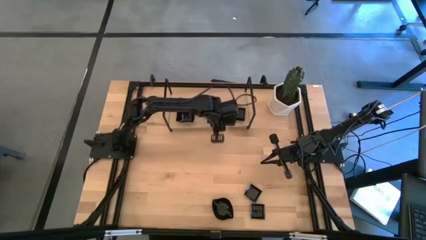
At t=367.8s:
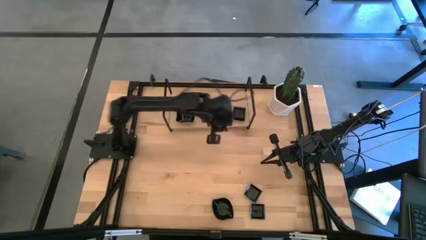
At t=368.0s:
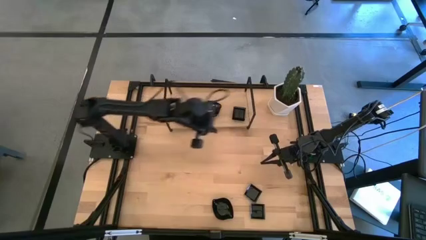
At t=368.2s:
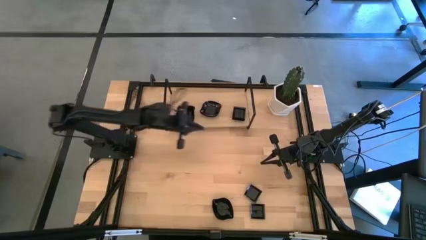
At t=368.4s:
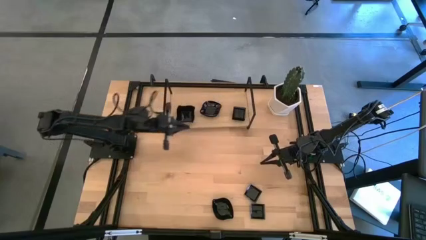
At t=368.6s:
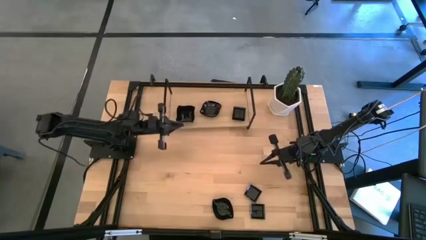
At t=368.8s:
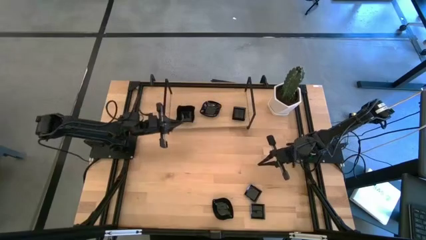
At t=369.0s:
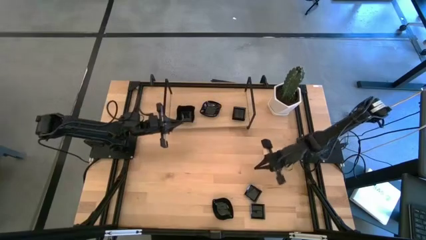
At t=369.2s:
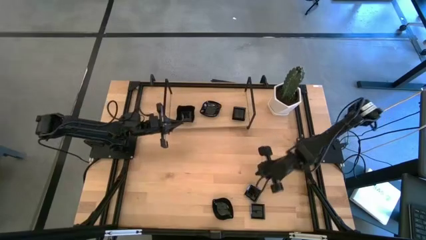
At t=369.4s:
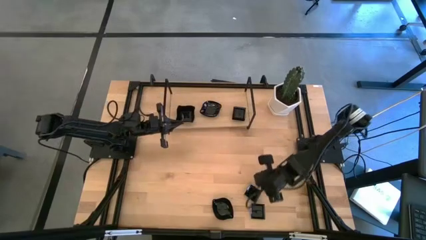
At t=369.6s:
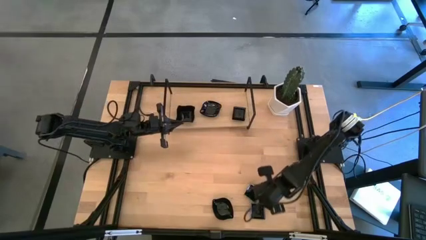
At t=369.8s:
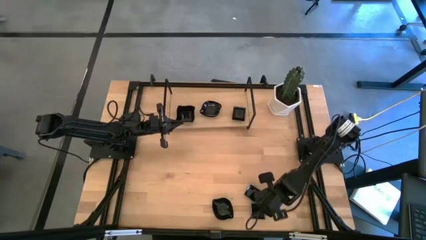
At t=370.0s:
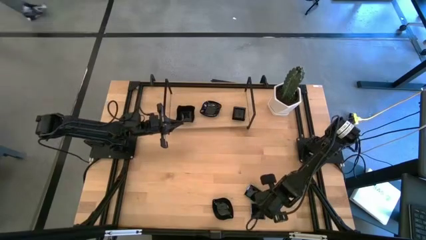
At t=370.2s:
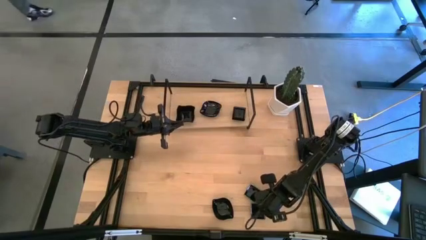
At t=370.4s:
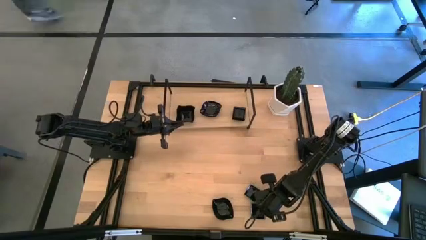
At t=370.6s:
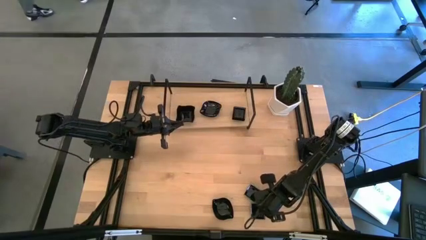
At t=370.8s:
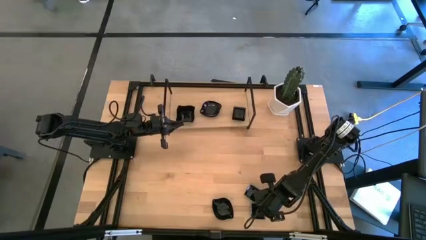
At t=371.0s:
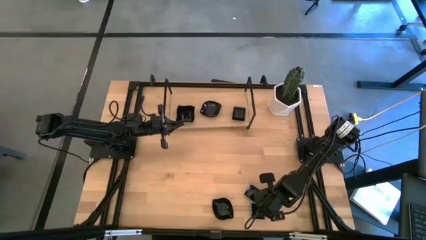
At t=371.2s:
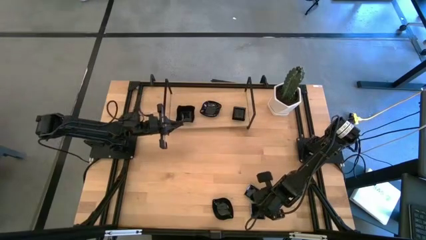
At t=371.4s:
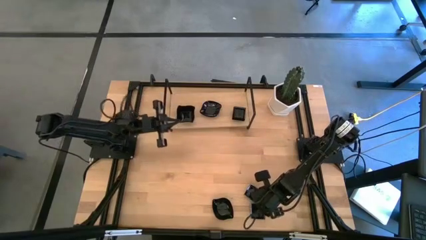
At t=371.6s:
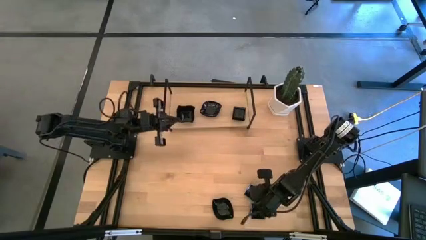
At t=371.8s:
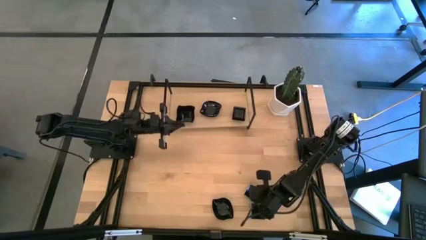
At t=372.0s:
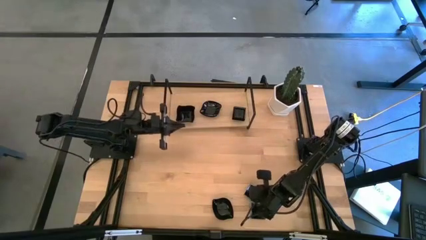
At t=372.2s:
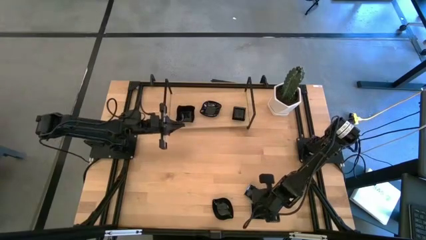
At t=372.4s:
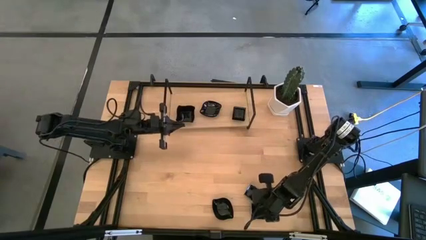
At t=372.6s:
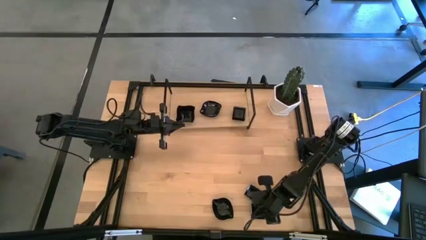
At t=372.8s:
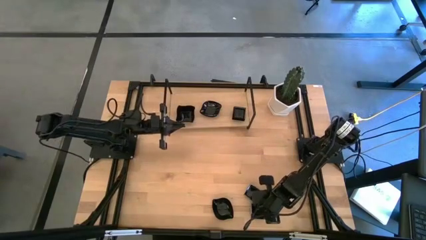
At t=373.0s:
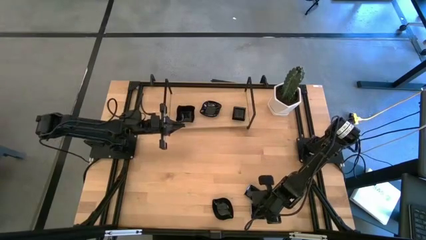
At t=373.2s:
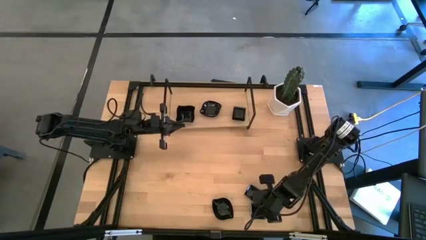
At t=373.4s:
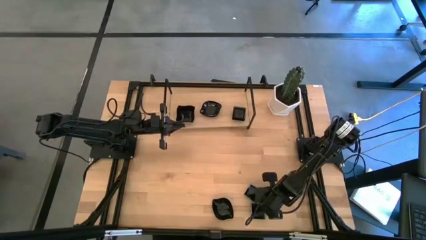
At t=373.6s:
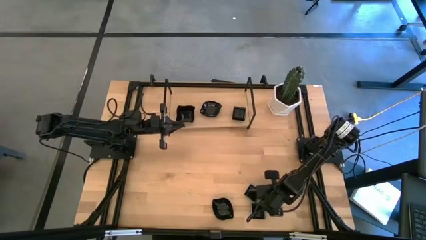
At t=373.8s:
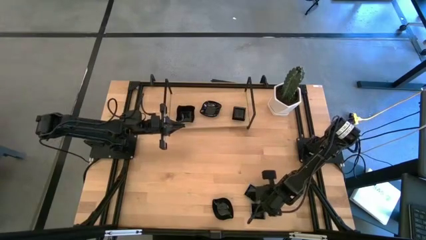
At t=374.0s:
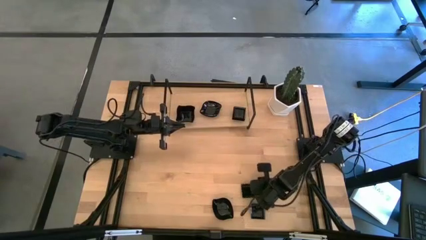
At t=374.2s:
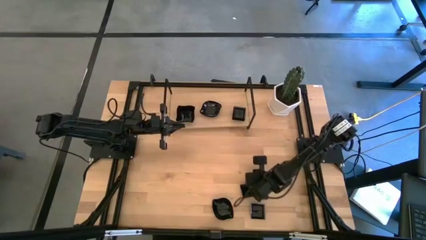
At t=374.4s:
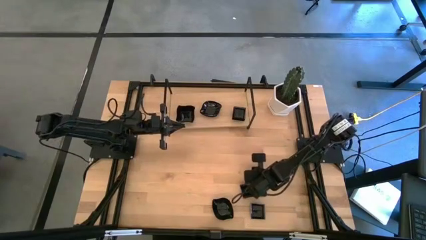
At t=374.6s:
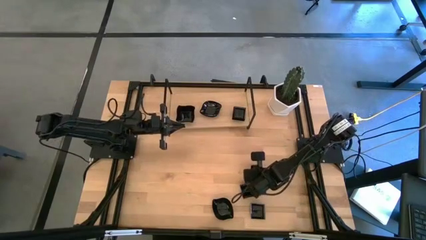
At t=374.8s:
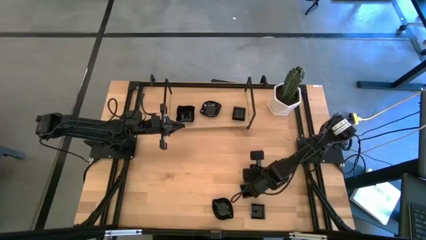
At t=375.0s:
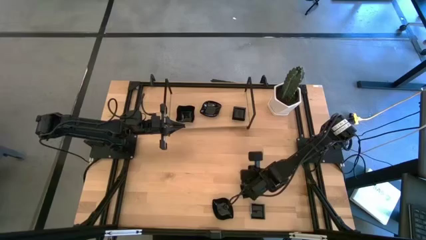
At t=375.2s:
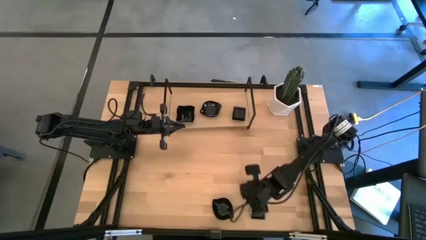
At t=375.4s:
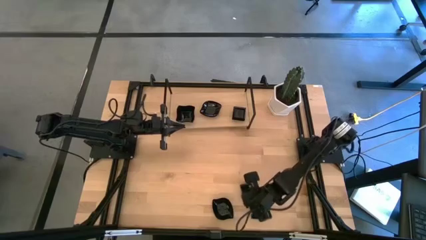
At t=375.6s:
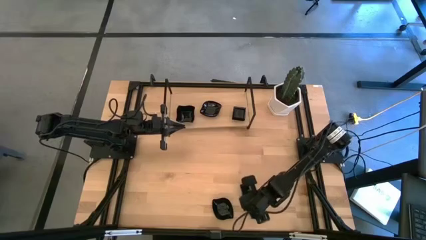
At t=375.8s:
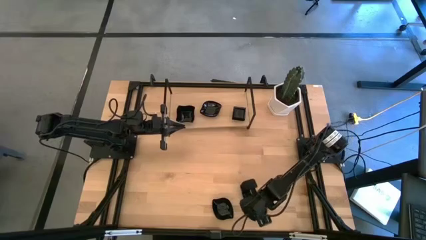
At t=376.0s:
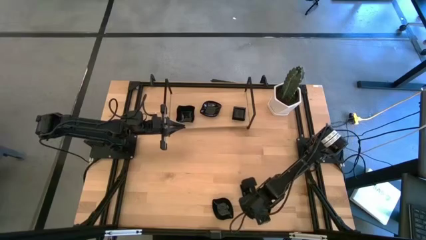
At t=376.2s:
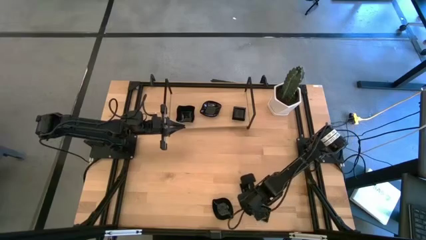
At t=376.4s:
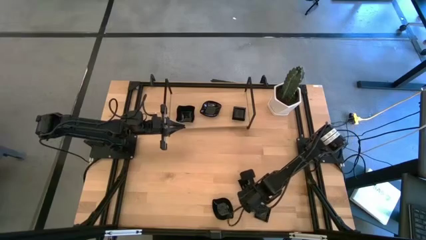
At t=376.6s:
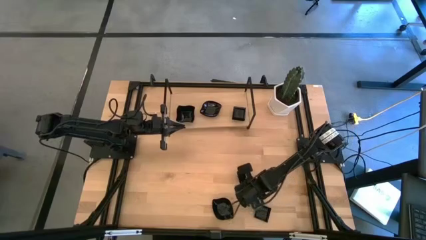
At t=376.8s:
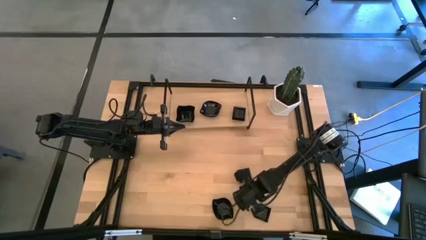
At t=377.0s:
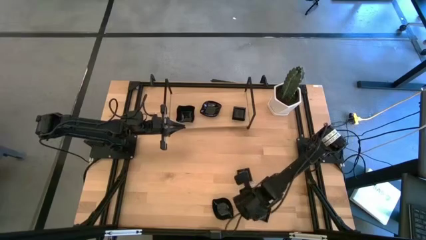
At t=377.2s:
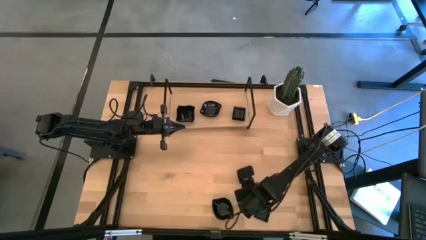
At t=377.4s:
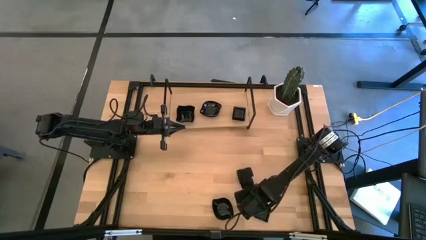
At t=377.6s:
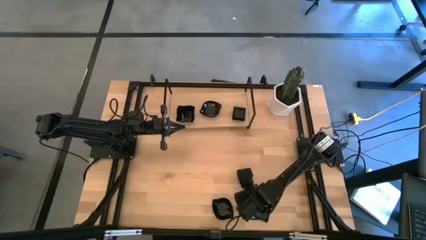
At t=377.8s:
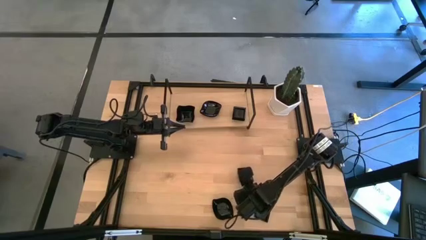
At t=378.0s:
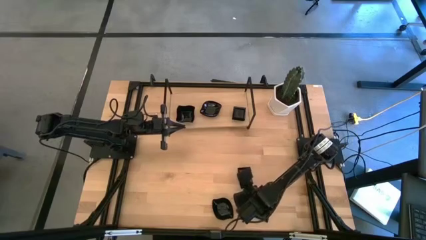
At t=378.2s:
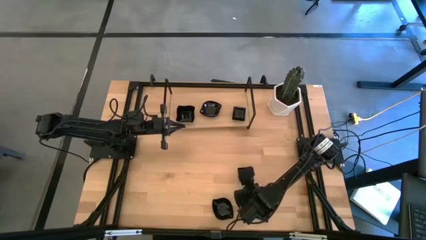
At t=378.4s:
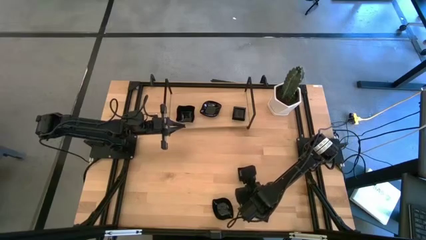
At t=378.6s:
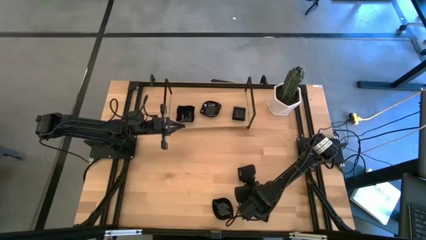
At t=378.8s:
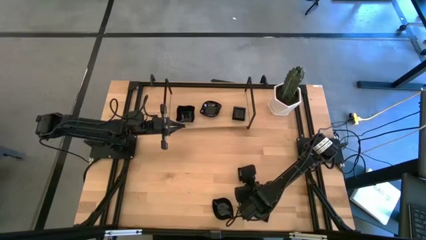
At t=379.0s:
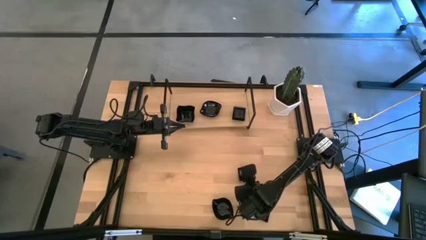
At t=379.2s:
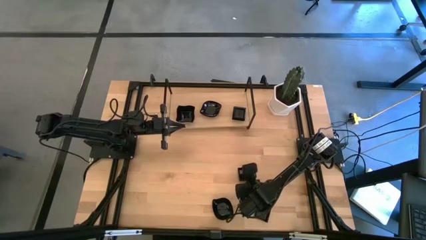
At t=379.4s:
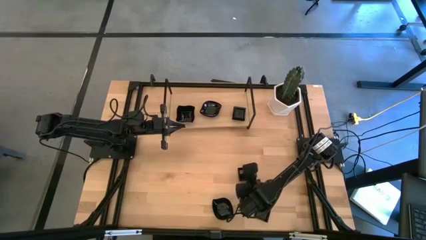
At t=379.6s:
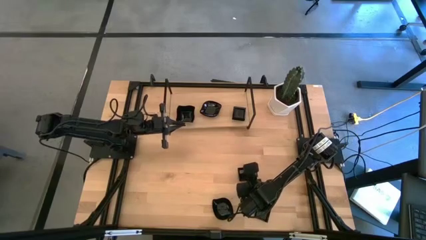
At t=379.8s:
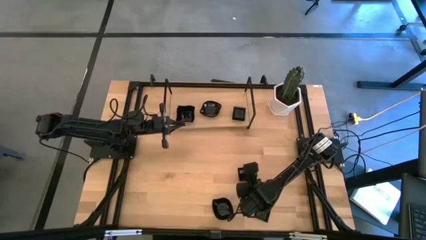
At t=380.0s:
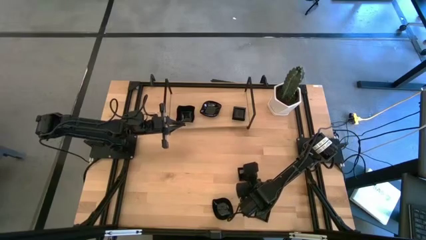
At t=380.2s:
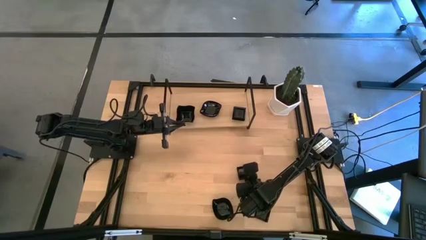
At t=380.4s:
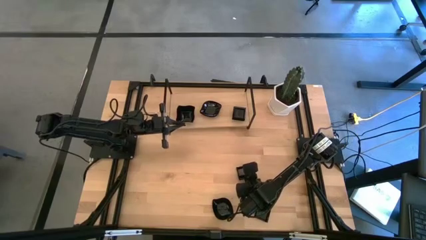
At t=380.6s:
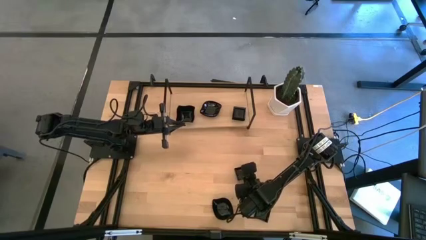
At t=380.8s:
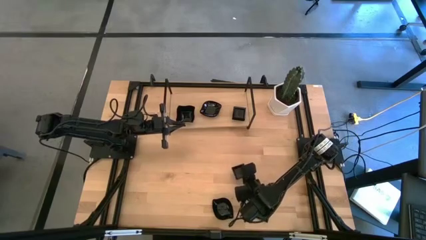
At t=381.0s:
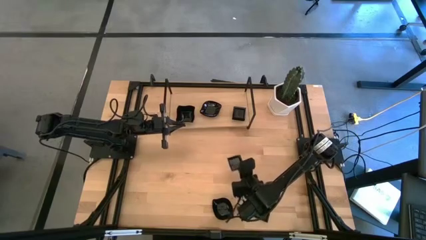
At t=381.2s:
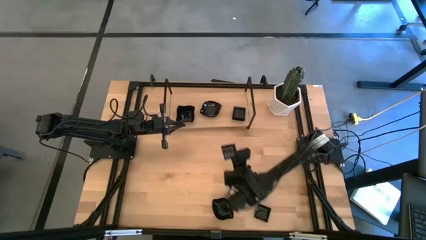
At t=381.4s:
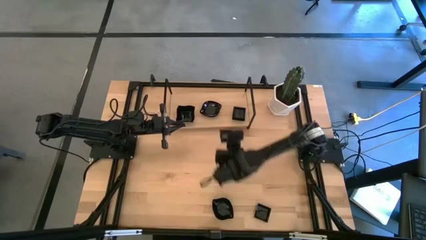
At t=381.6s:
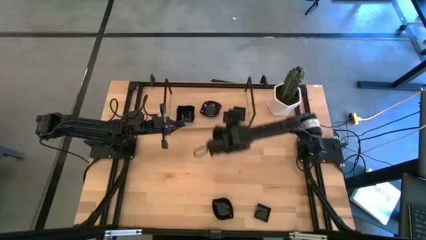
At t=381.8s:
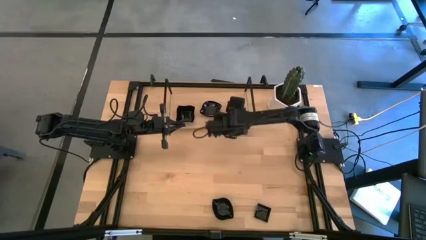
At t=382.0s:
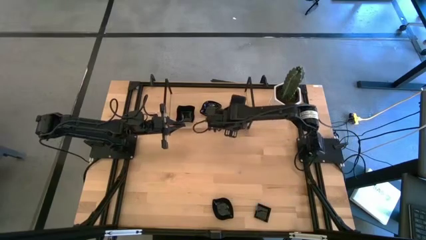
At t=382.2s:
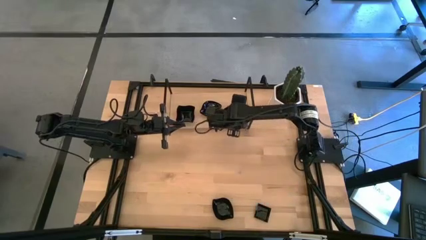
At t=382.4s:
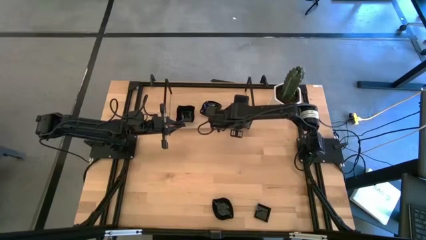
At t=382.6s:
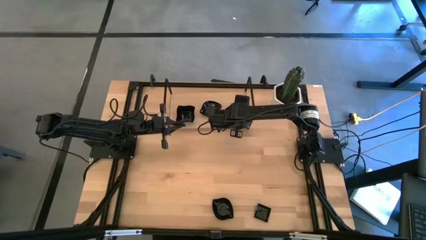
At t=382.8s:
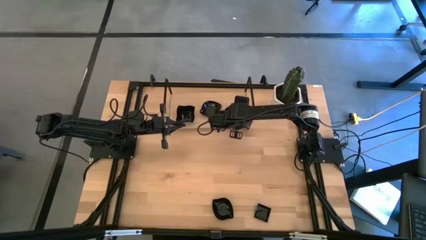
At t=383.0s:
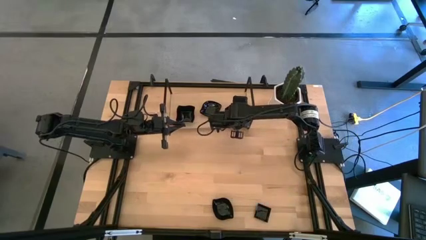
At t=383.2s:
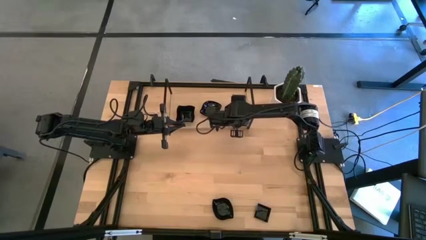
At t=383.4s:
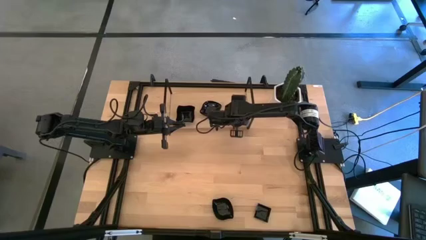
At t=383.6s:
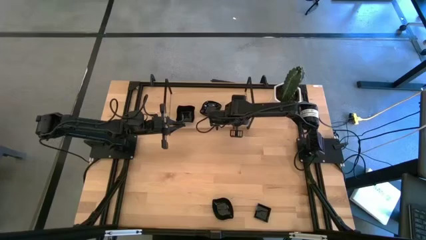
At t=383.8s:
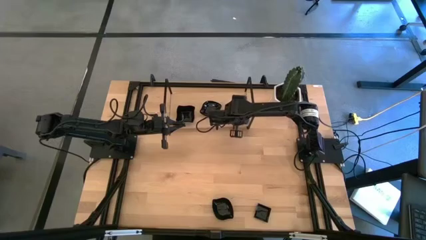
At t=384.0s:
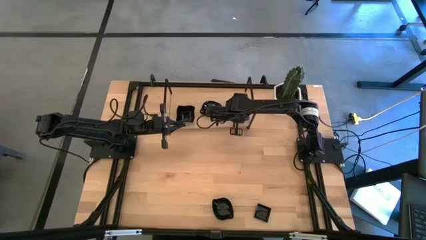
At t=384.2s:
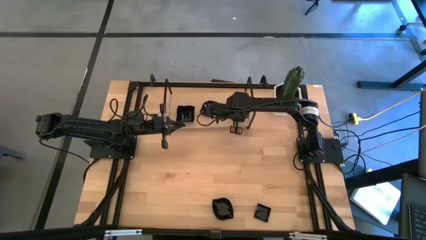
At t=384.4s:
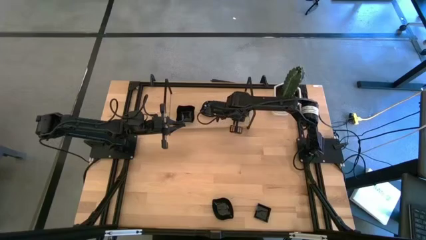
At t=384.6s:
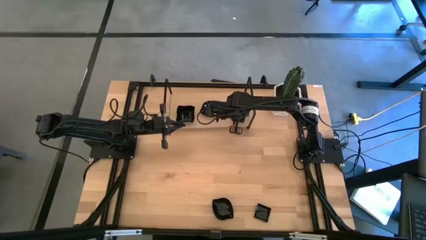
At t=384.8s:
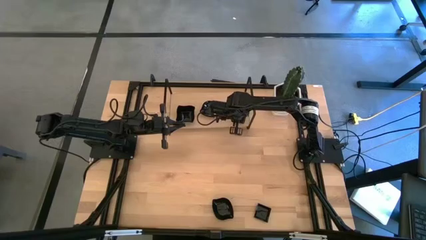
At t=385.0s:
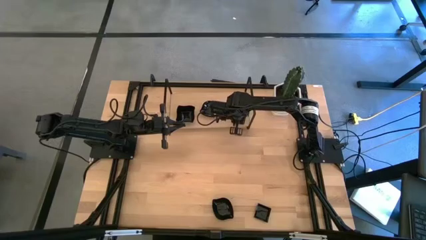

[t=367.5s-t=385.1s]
Task: Pick & Place Mini shaped plates
Stack the top square plate on the top of the square plate on the shelf
